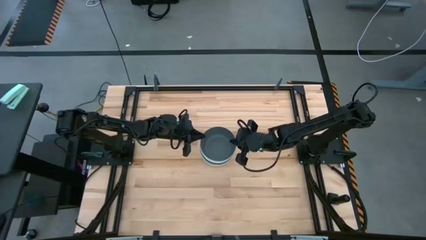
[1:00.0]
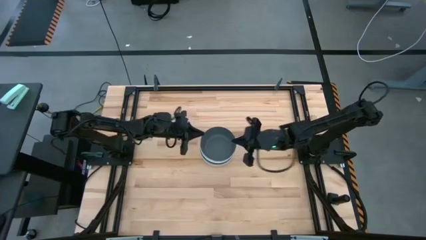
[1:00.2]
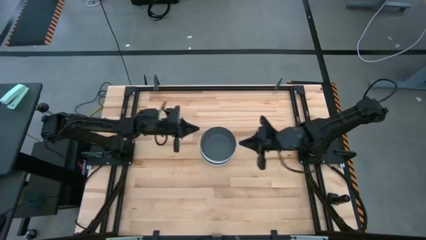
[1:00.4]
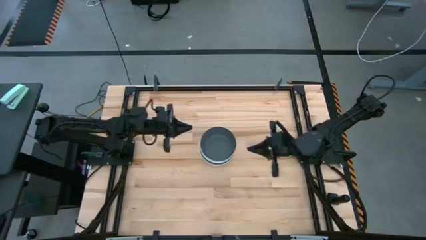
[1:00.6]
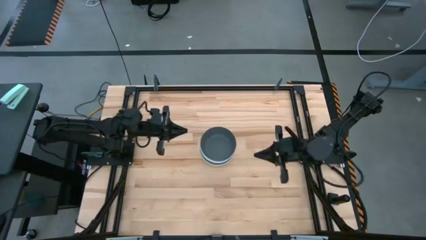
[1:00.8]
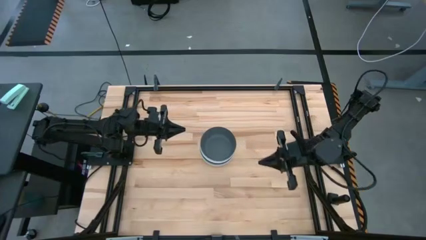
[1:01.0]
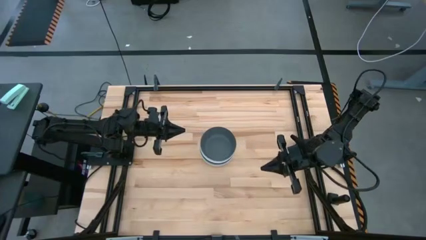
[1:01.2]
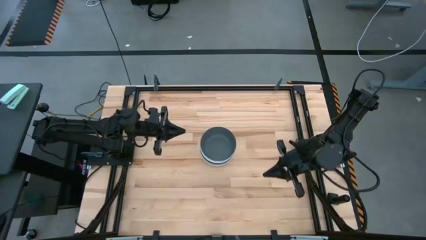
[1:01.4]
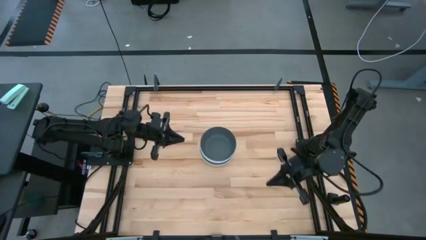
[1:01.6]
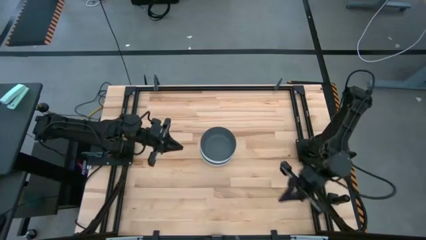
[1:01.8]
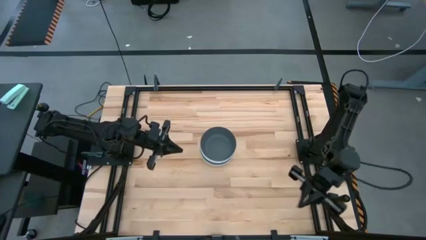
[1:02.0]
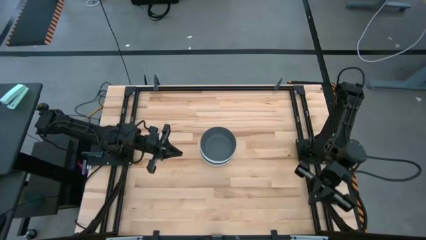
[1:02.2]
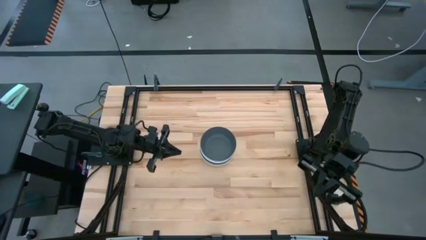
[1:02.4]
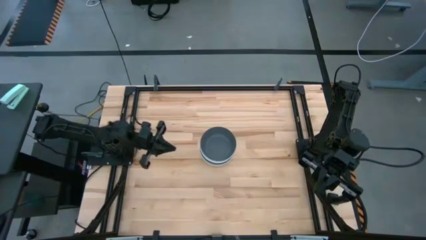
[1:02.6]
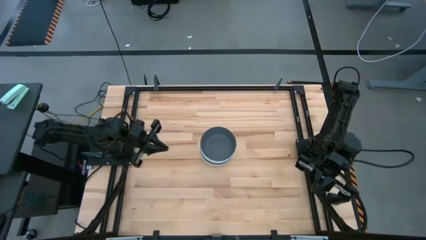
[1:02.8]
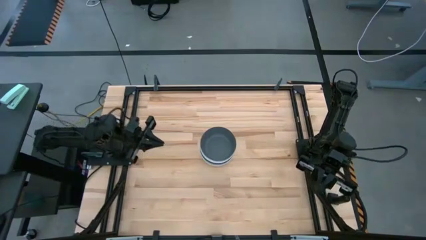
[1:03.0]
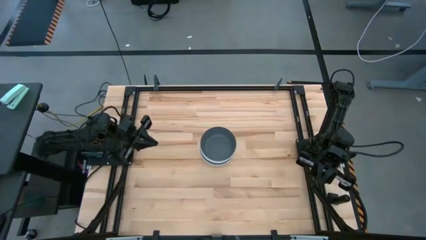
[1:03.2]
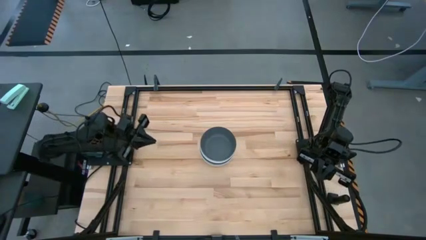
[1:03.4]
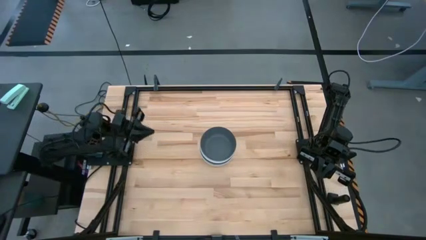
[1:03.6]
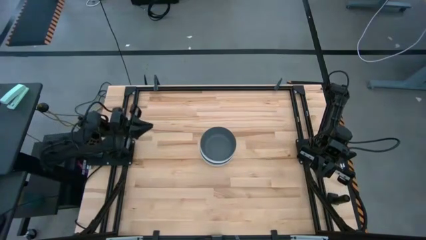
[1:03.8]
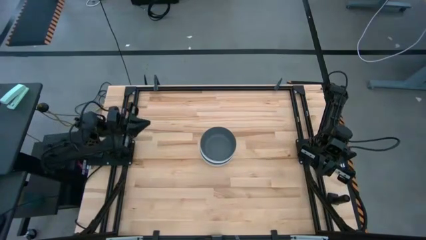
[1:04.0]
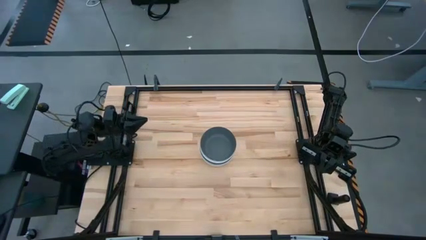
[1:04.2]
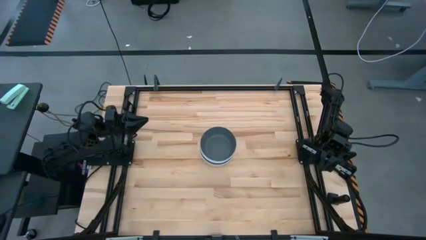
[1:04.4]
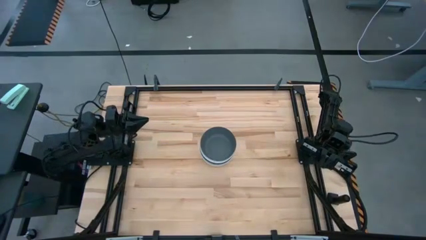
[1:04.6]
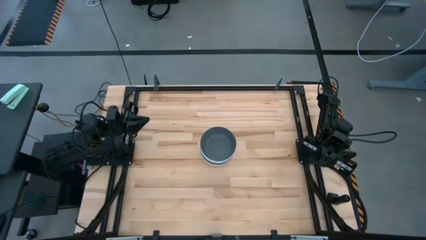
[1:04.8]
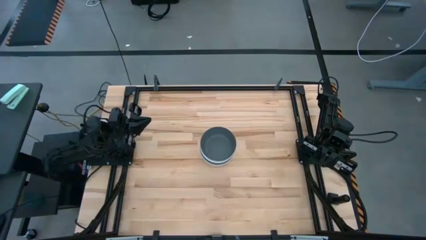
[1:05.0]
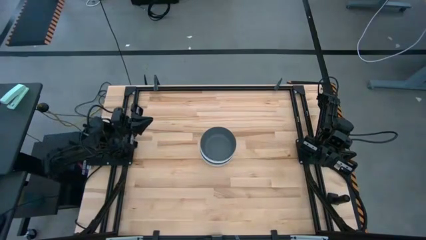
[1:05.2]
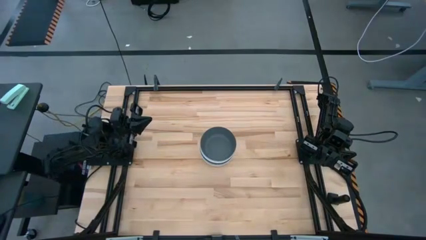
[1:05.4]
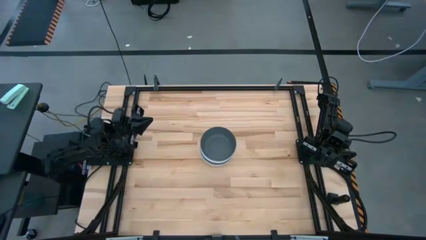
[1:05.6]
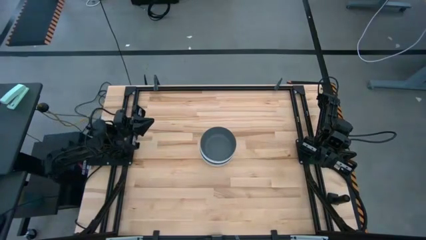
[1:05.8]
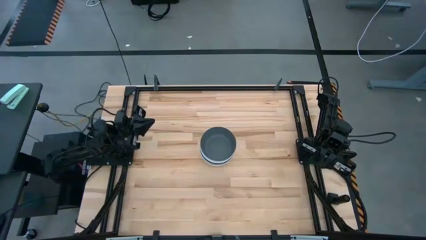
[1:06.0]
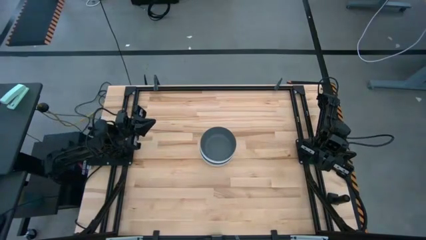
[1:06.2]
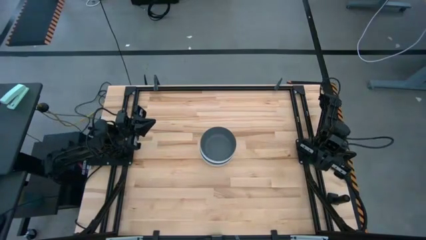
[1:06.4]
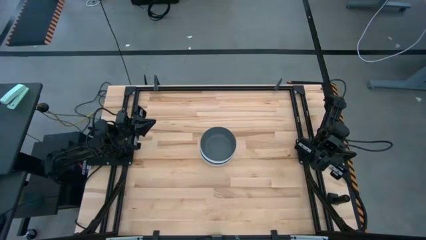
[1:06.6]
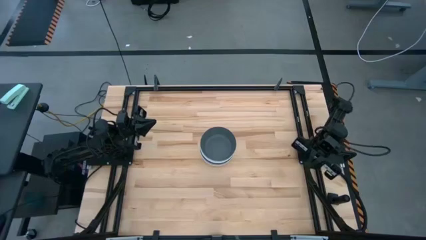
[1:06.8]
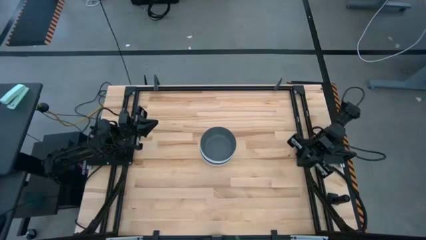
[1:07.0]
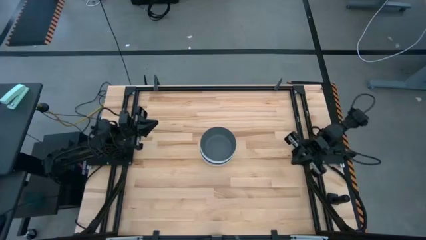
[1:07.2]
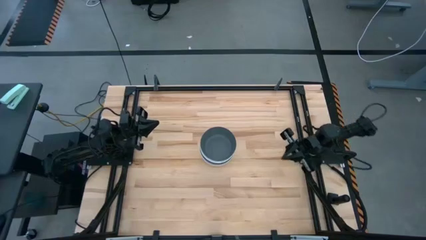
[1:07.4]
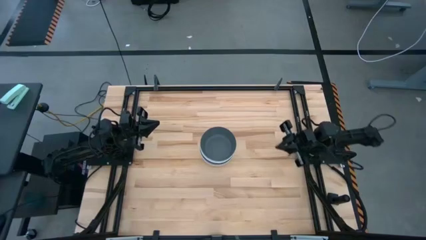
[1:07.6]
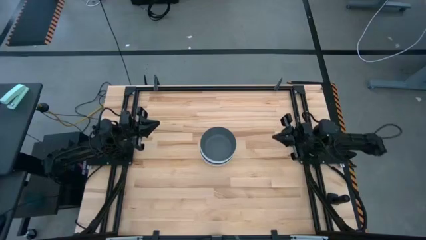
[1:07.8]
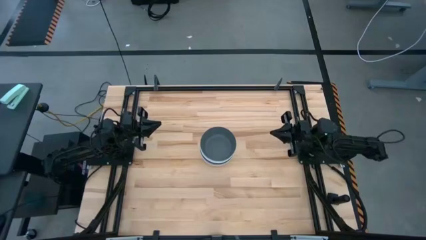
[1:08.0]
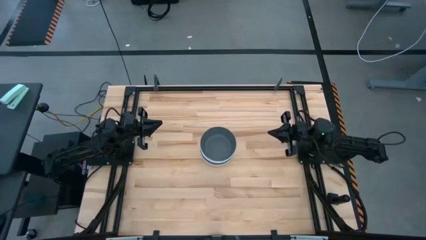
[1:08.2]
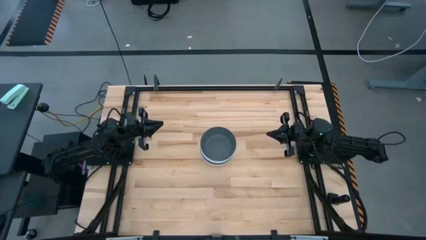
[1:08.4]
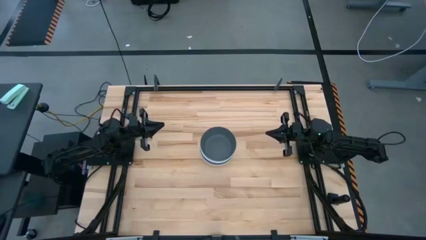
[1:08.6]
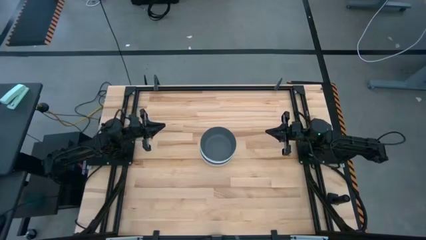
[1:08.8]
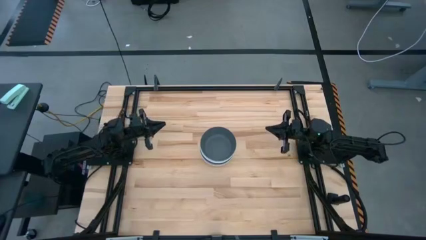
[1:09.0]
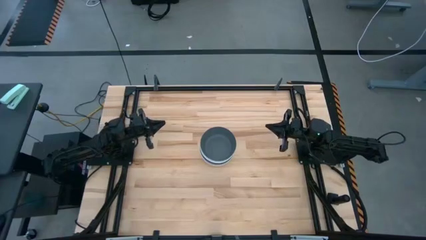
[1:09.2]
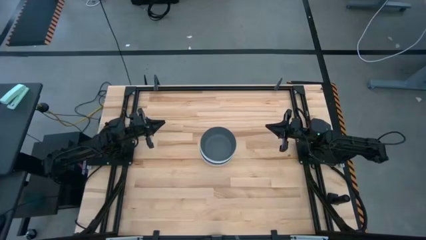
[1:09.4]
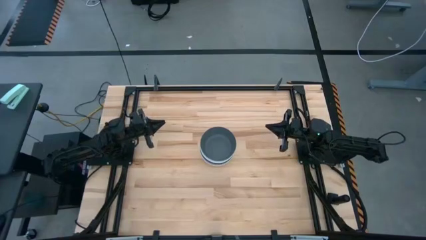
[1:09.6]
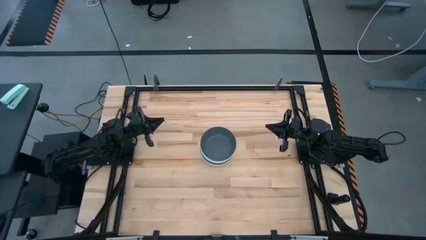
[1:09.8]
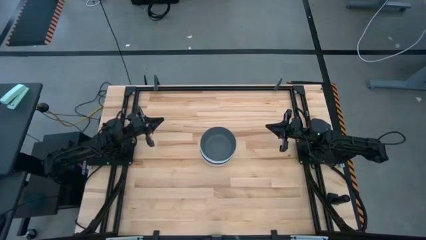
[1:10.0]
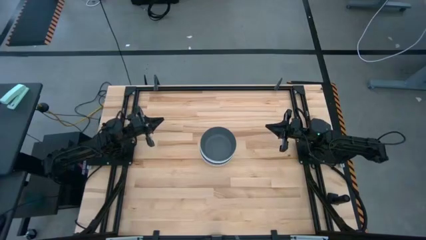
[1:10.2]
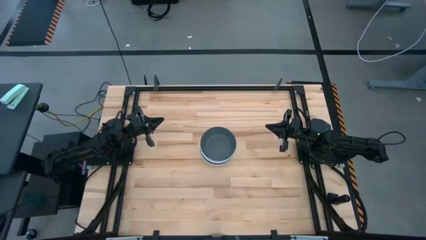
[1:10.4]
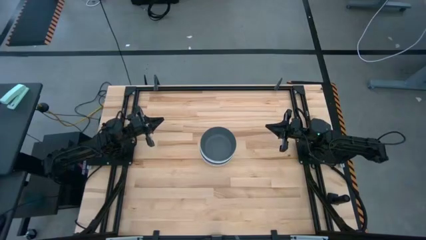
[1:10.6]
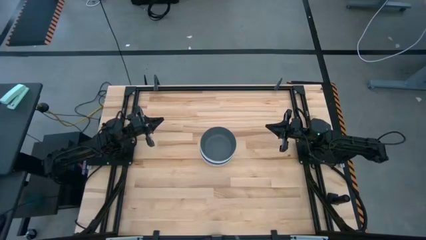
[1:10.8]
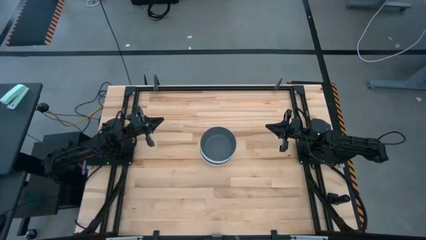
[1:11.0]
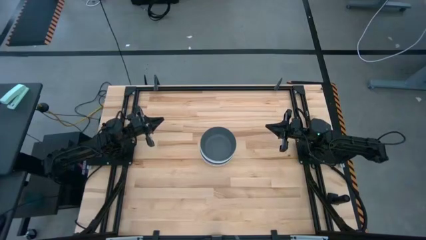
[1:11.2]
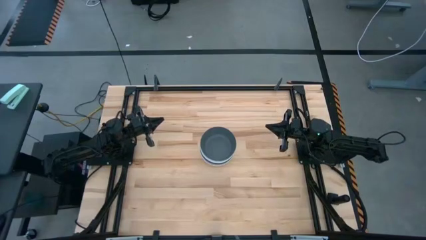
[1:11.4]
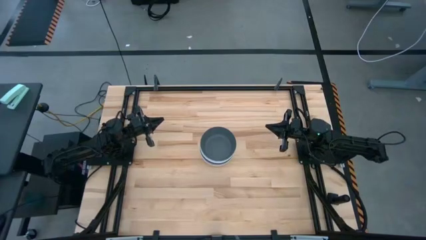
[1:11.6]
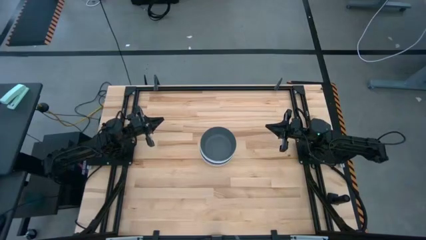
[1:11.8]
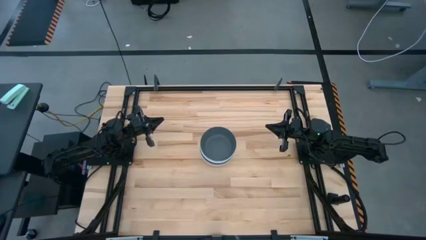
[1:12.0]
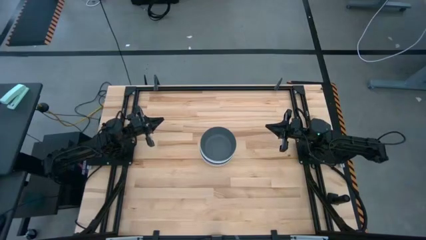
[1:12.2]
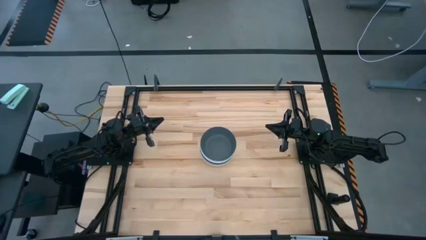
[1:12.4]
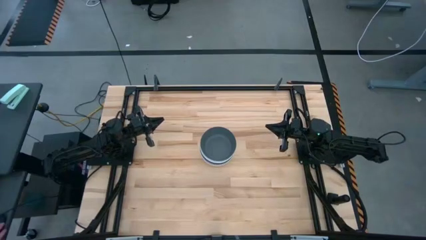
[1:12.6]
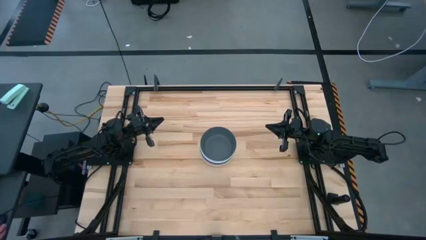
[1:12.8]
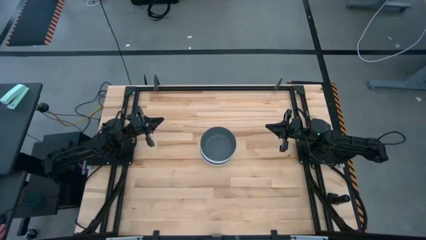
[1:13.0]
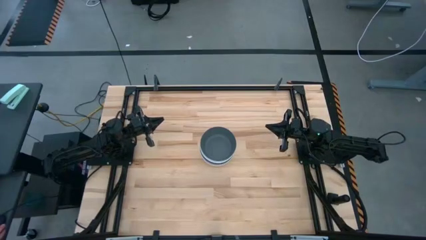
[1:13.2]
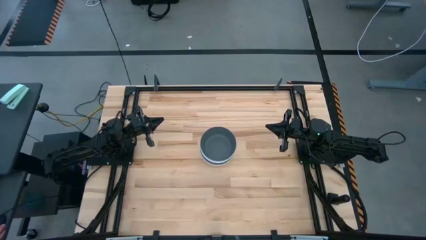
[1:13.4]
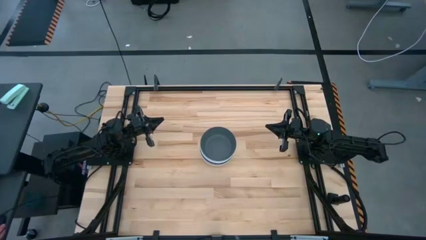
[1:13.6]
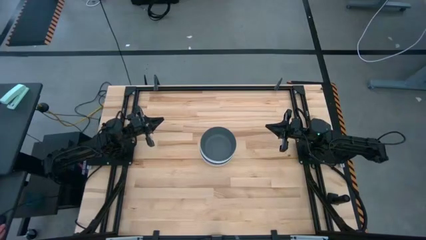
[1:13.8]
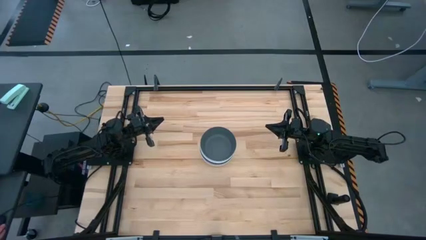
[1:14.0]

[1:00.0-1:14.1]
Task: Nest bowls inside each other
Return to Home Position
